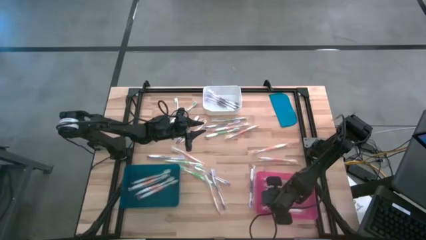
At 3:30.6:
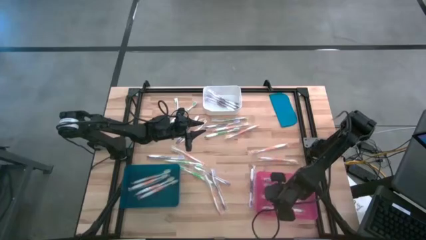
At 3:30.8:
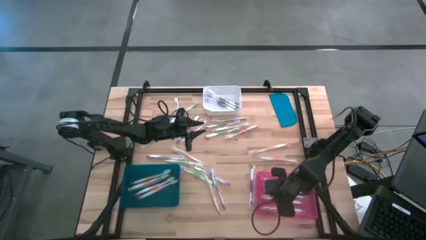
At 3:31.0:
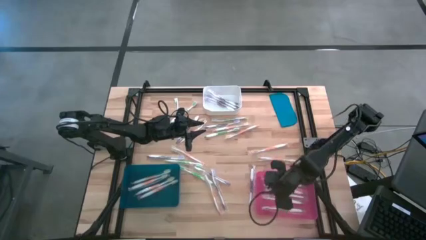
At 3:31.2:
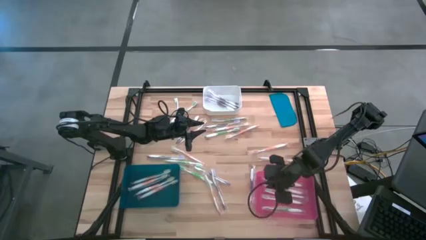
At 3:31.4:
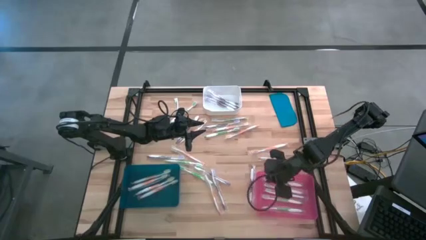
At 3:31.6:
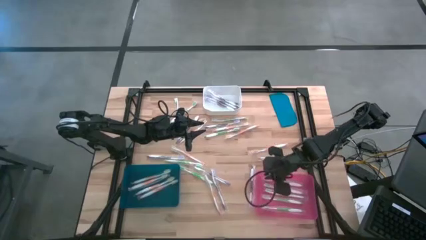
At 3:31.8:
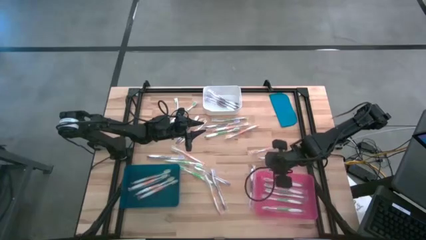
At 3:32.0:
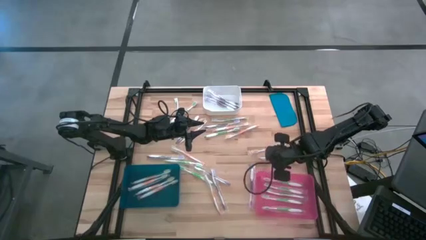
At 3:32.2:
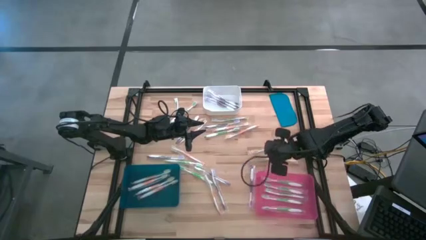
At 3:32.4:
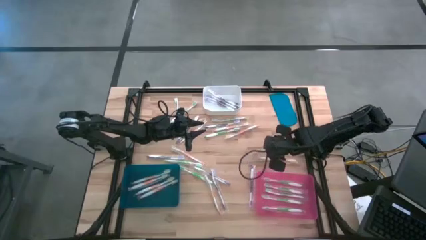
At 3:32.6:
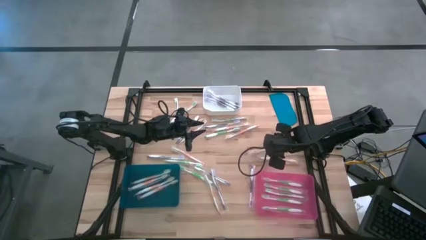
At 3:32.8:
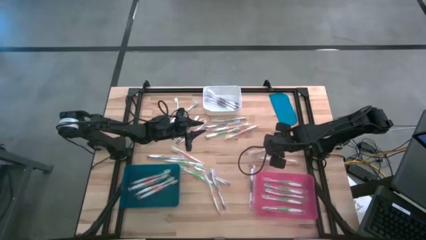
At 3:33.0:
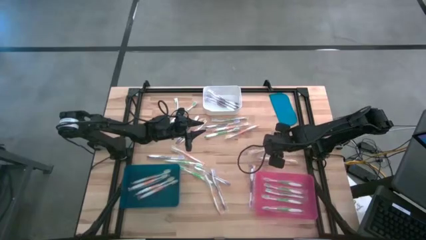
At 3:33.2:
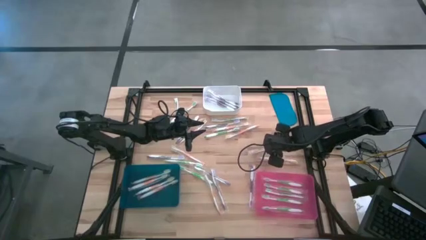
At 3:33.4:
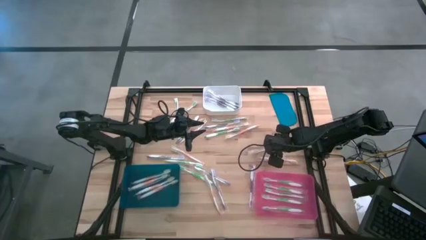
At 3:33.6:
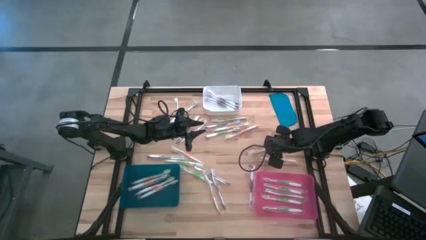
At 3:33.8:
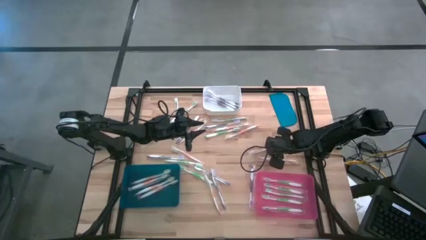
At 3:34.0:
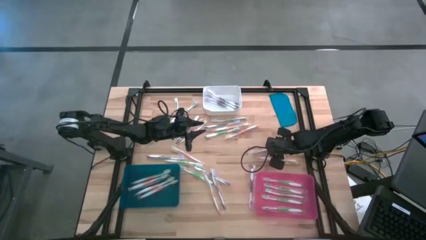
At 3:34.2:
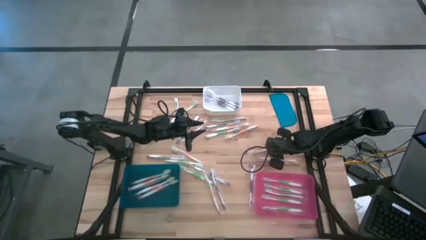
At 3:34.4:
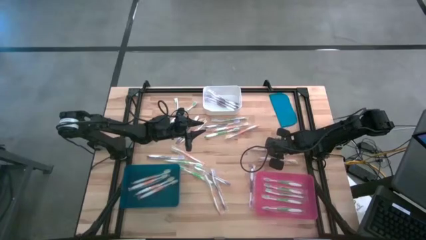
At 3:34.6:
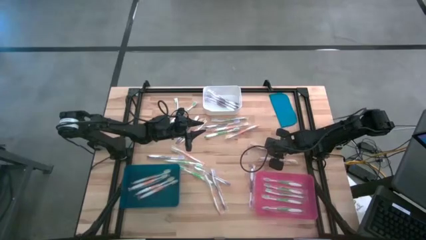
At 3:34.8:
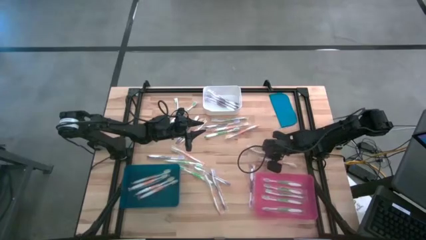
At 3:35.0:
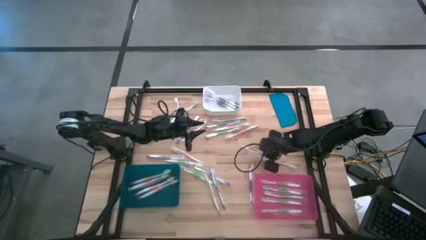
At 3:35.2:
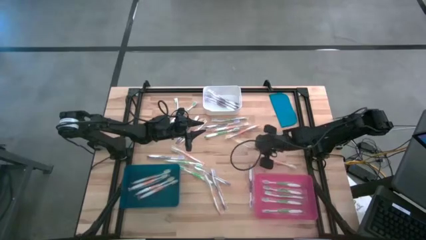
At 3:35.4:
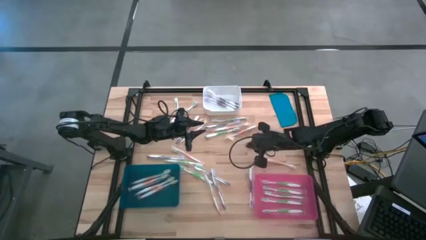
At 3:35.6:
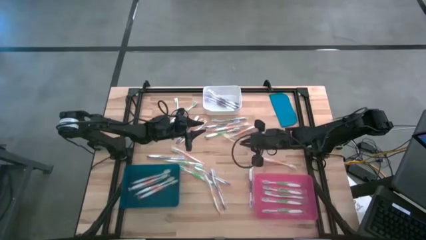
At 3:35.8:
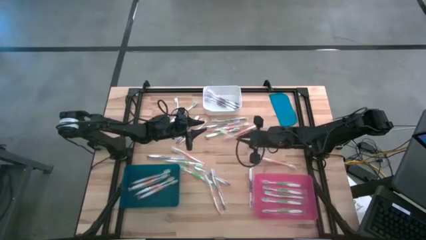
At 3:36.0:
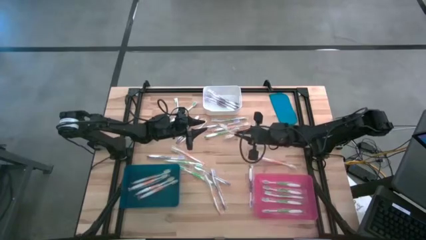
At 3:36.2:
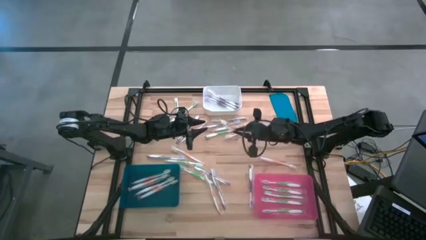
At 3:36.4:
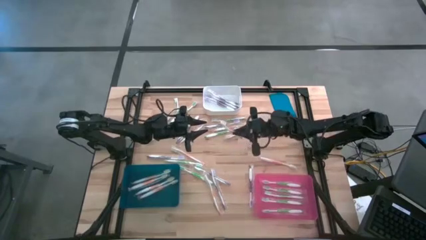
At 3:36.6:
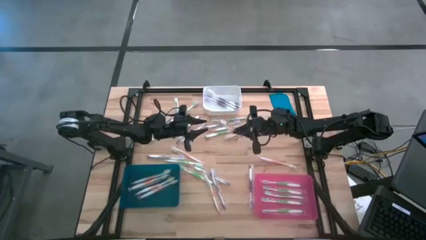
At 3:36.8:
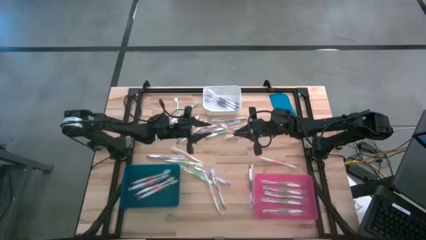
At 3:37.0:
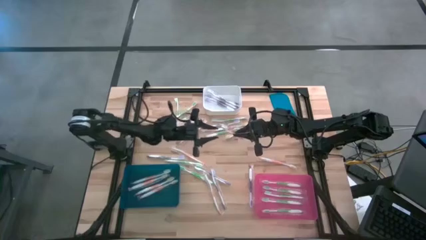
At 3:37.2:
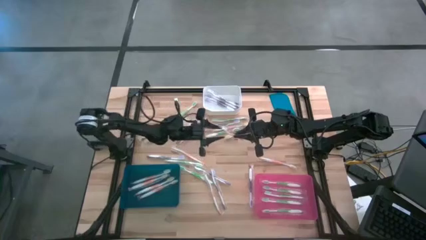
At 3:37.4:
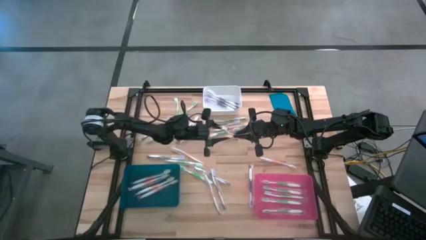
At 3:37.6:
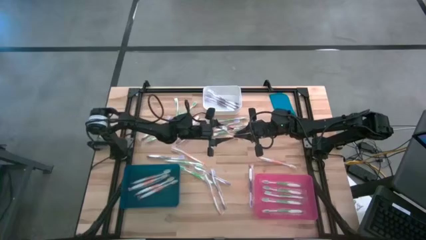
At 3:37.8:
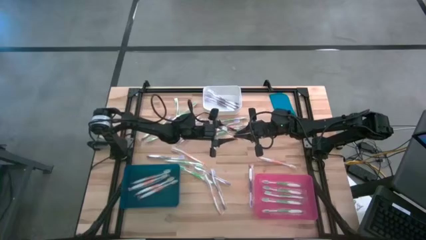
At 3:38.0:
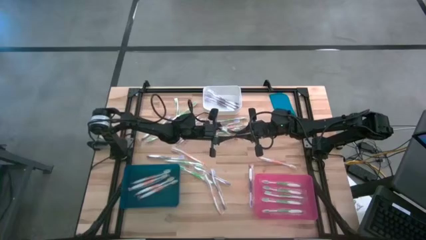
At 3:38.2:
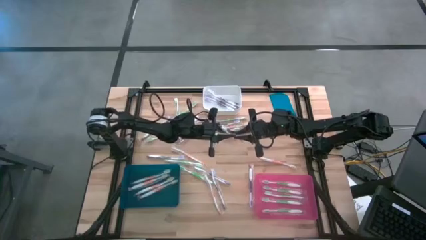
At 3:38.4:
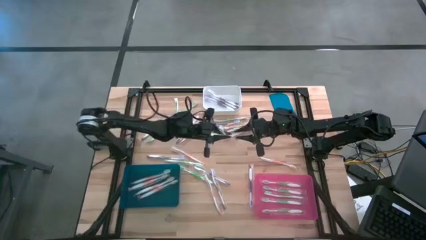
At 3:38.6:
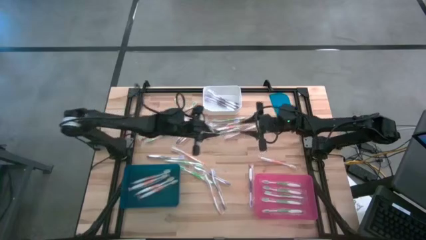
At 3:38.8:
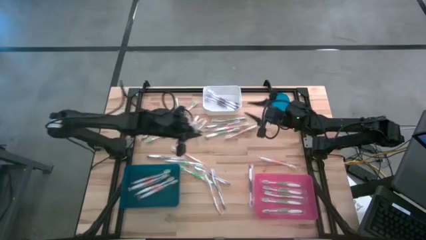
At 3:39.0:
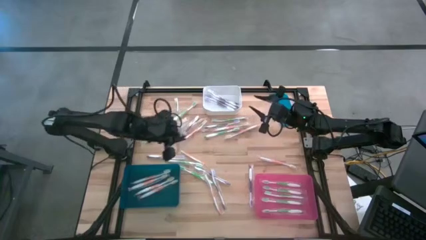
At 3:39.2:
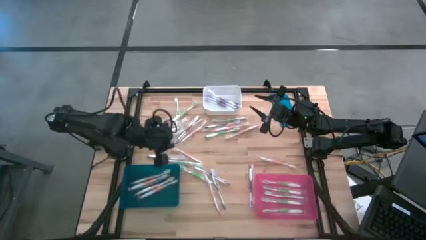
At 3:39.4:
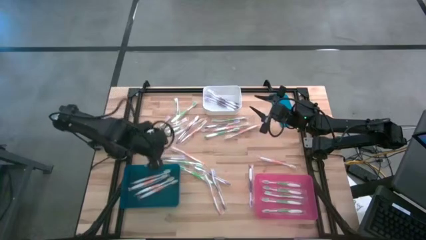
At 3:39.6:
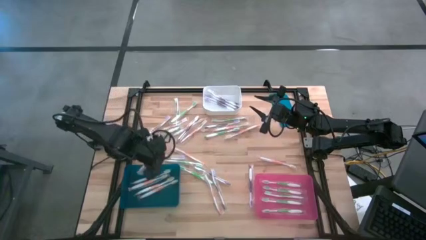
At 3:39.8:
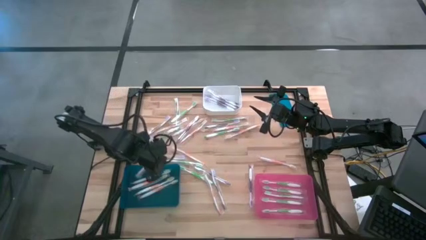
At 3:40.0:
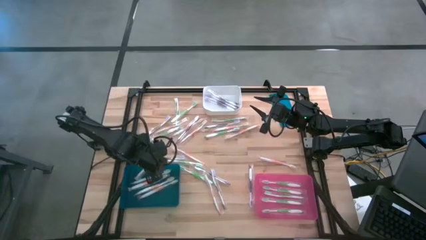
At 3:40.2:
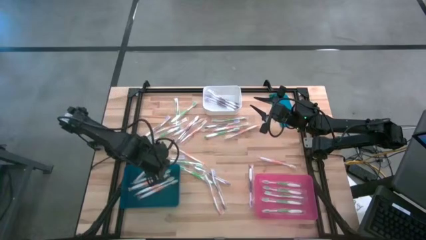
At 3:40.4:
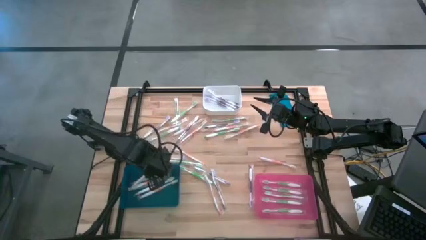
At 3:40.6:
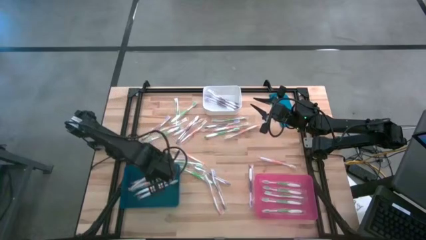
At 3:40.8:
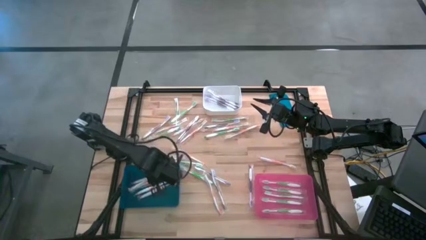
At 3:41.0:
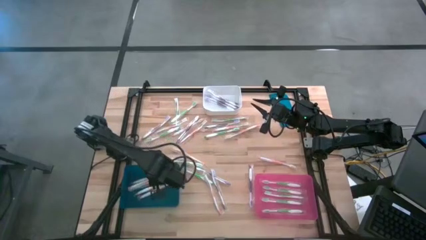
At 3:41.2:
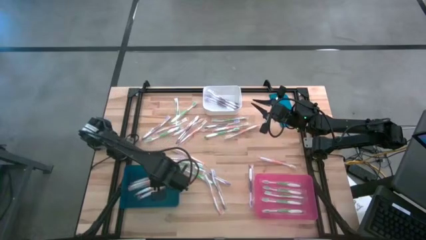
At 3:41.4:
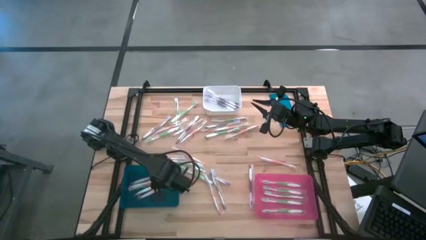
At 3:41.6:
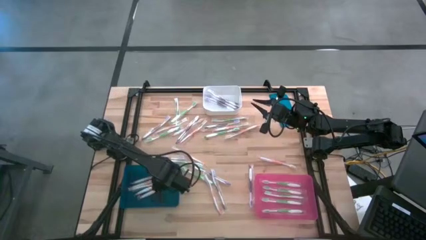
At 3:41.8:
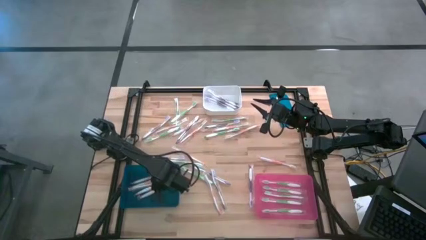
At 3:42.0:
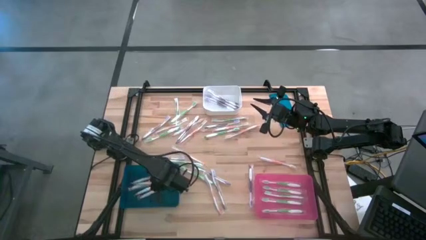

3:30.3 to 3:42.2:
Task: Pick & Place Toothbrushes
Put the orange toothbrush into the blue bin
